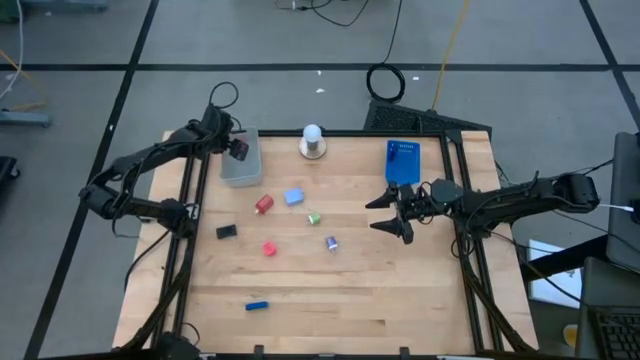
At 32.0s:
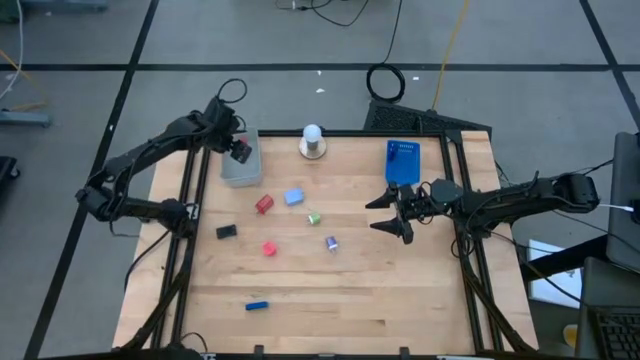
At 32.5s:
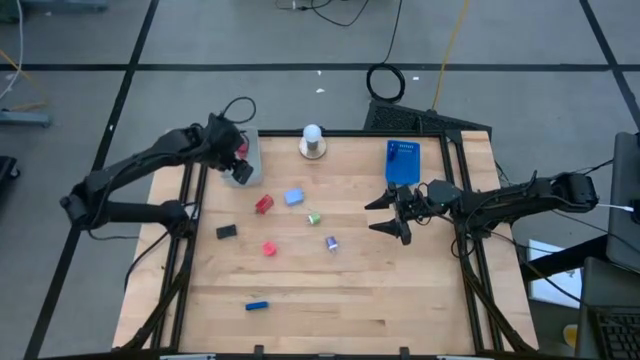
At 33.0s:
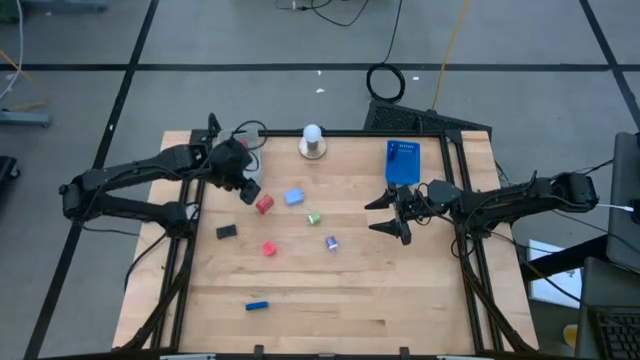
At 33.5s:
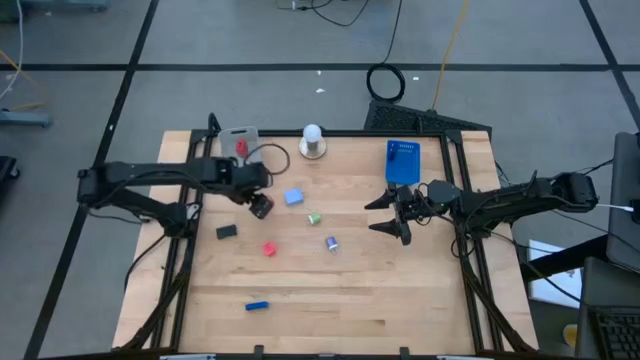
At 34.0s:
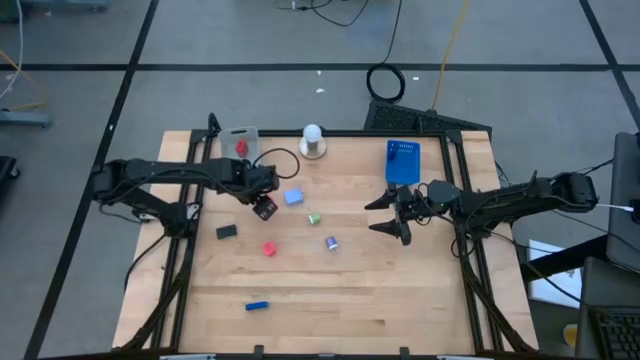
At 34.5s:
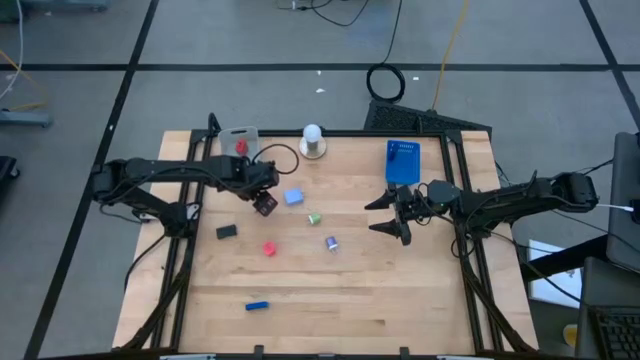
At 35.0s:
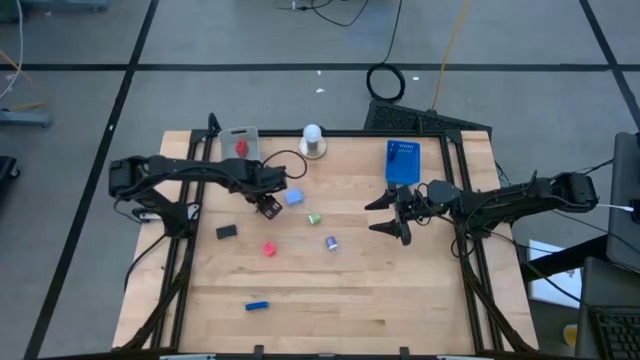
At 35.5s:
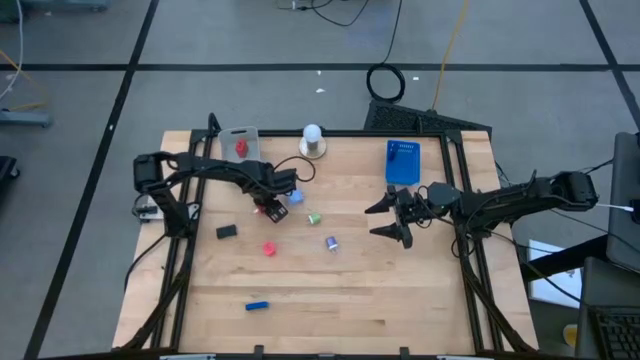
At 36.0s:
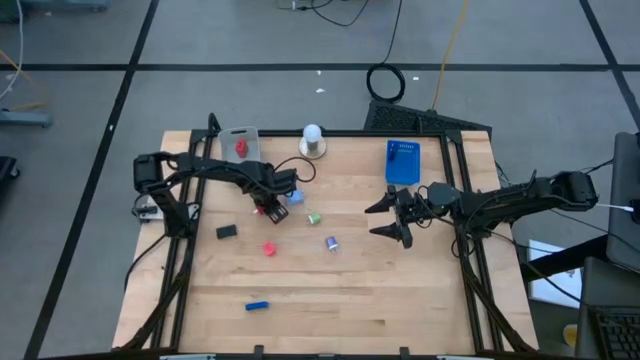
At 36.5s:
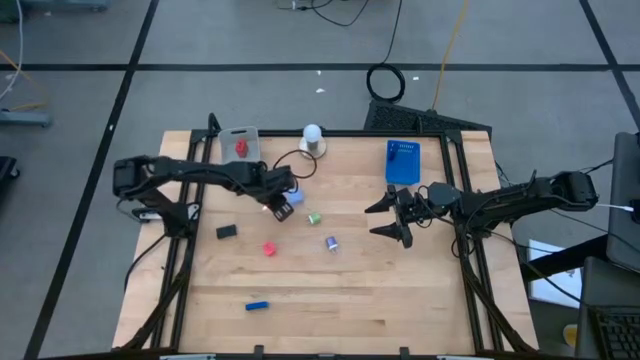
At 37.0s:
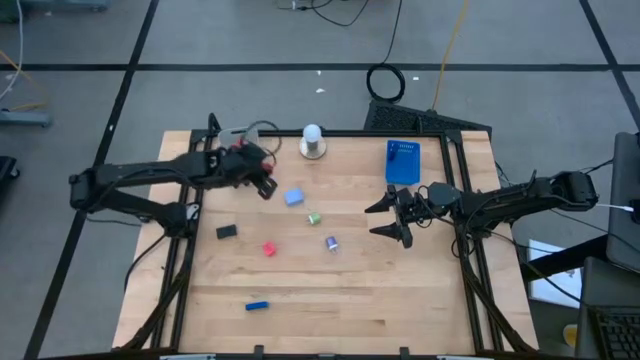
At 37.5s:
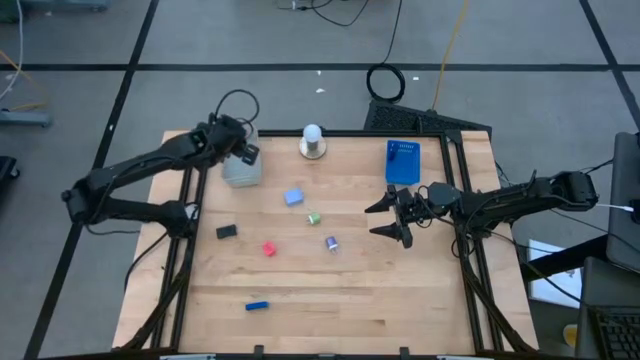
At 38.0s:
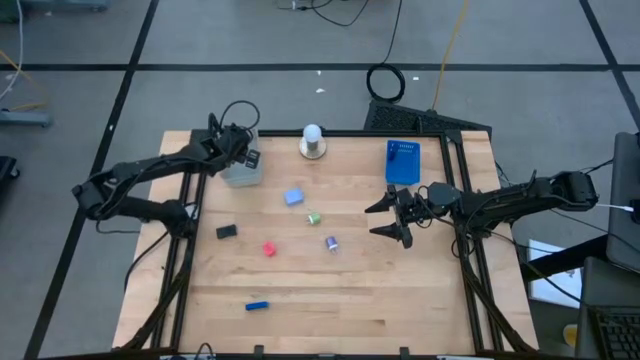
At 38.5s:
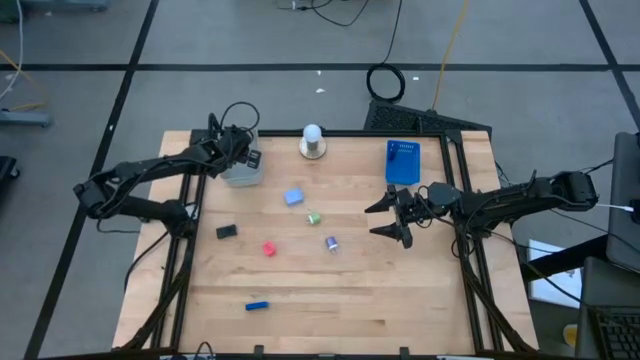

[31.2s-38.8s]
Task: Pick & Place Office items
Put the red charger adapter into the gray bin

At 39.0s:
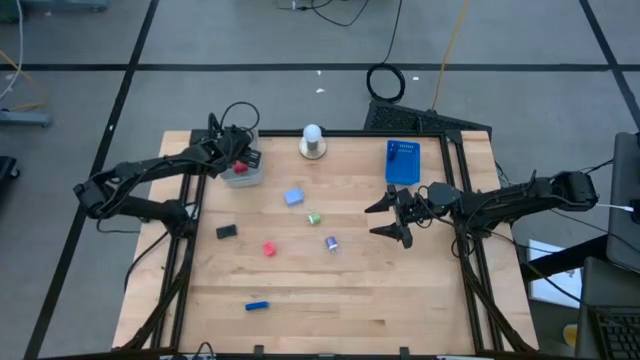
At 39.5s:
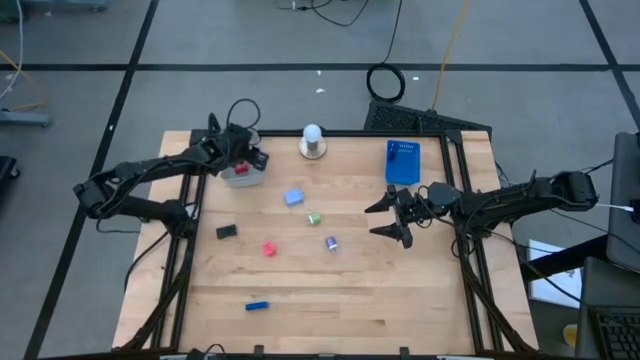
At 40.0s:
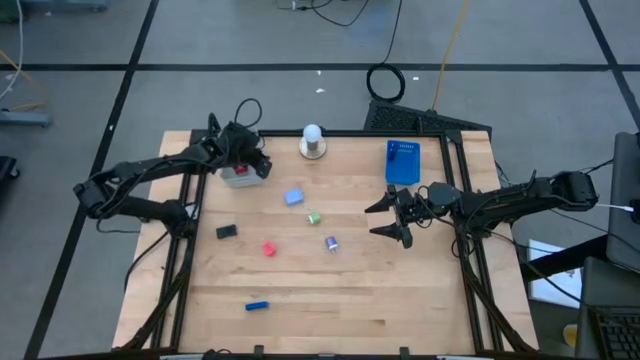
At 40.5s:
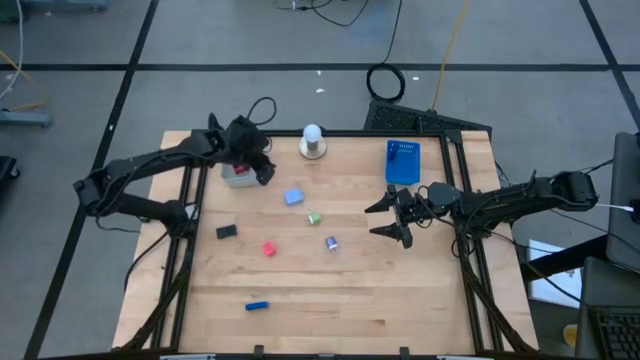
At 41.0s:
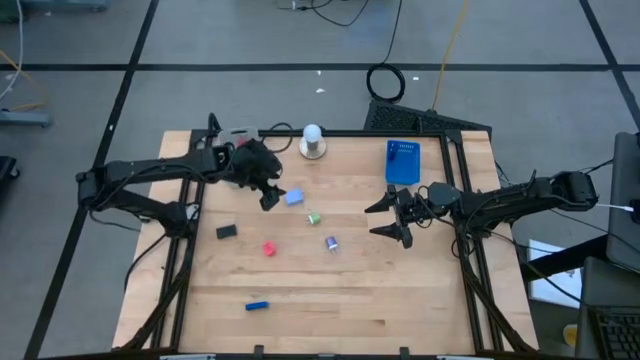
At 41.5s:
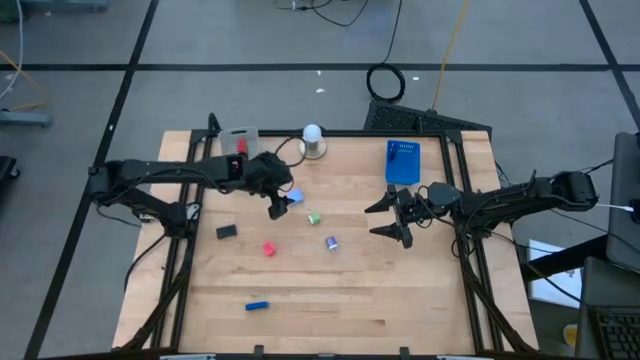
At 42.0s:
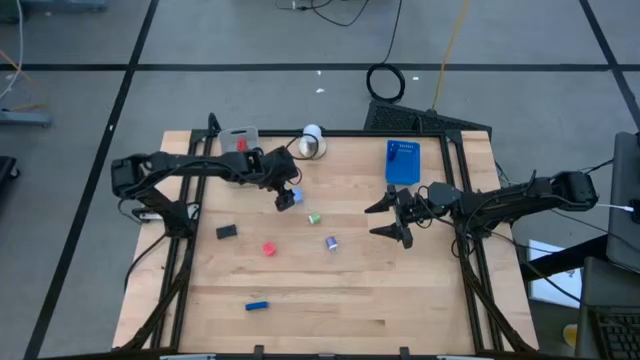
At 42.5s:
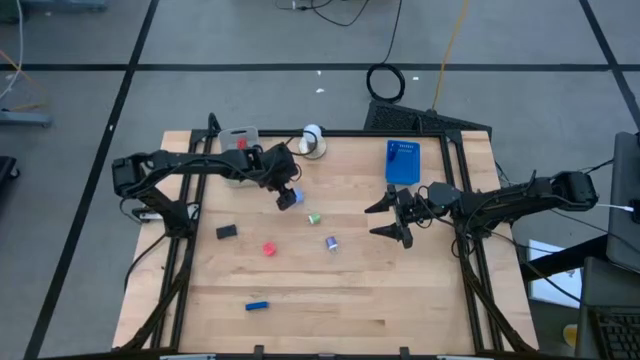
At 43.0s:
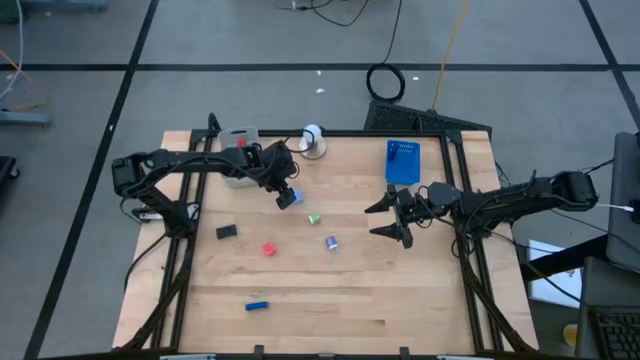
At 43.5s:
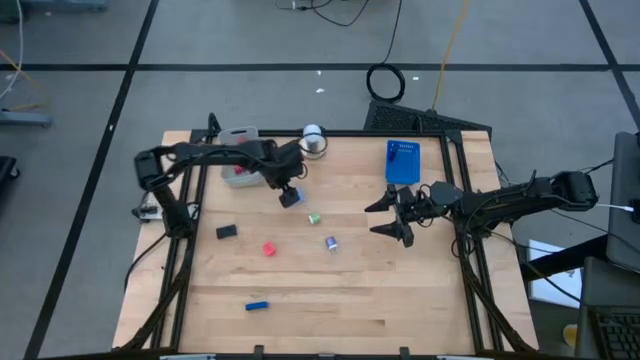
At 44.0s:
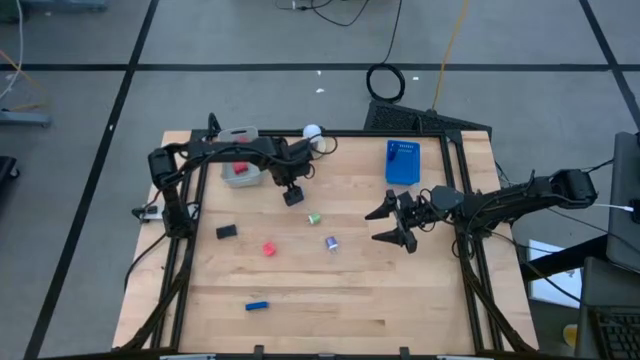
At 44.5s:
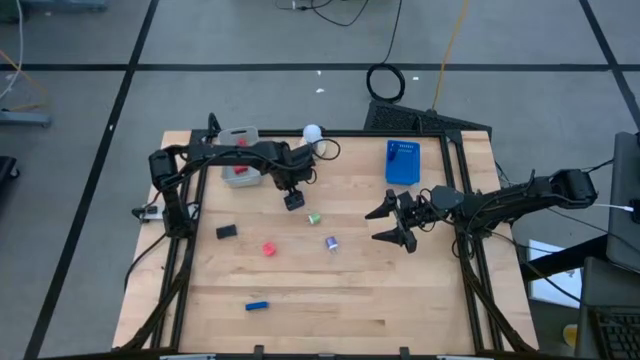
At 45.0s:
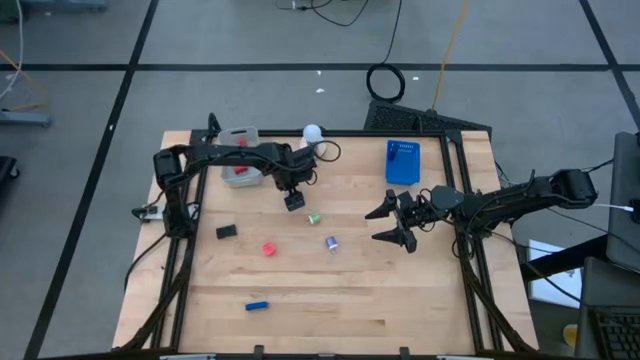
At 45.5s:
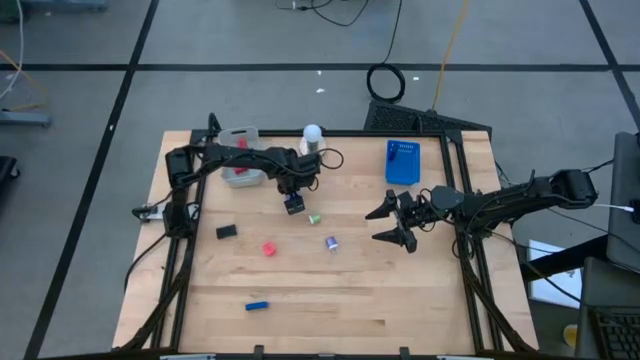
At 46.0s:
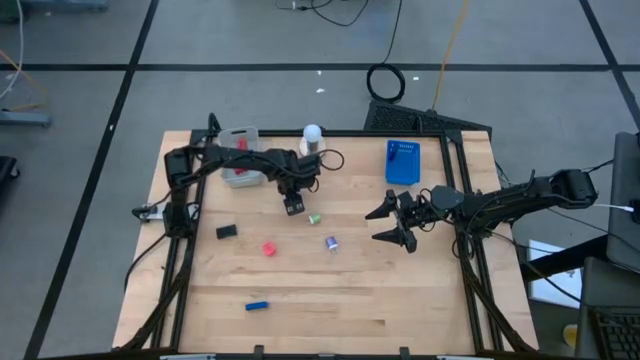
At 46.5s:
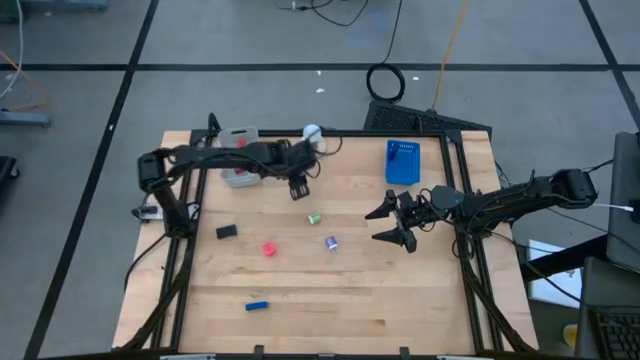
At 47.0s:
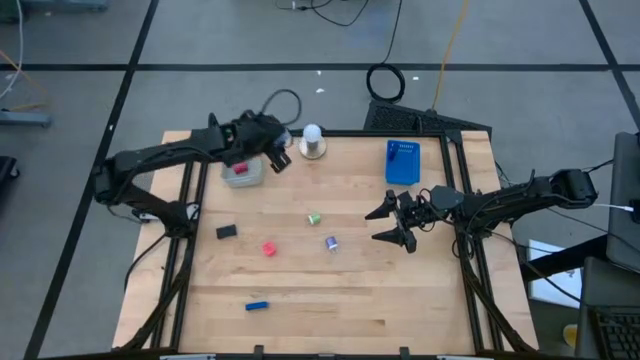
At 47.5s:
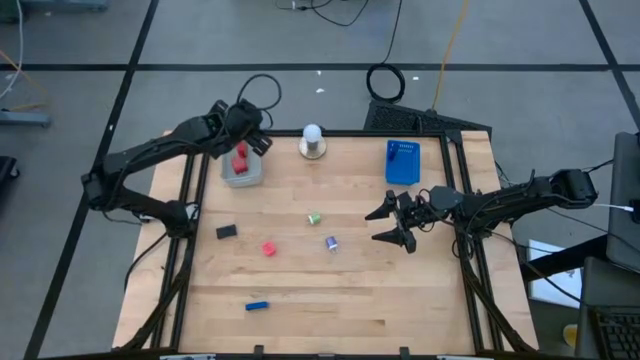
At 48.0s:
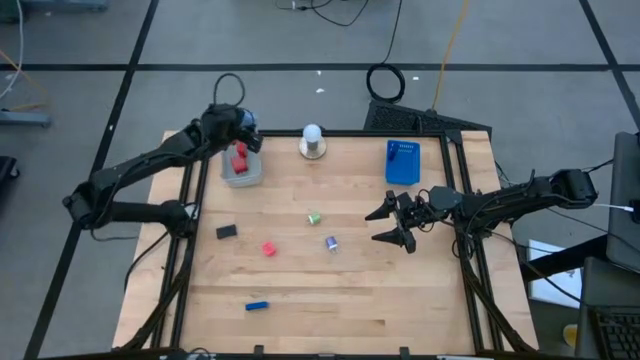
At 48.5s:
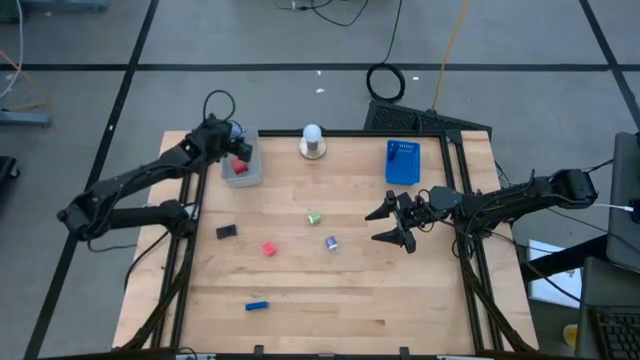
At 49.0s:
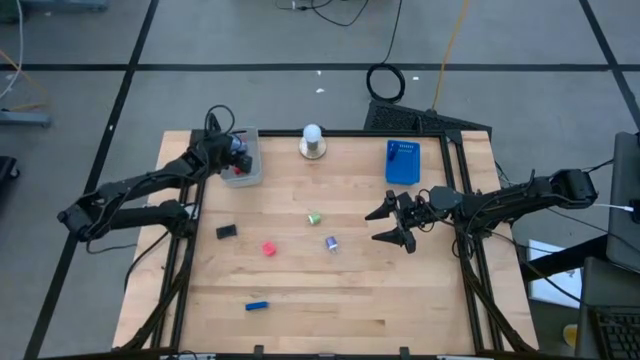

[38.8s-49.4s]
Put the blue charger adapter into the gray bin
